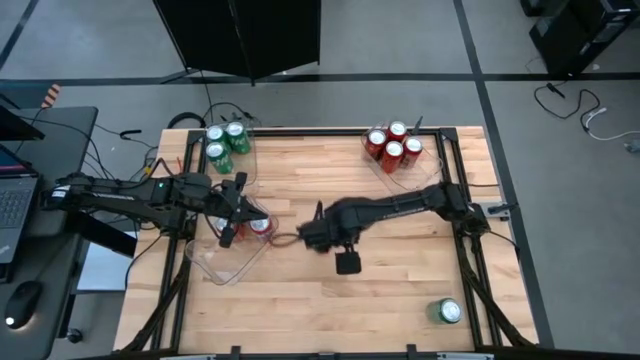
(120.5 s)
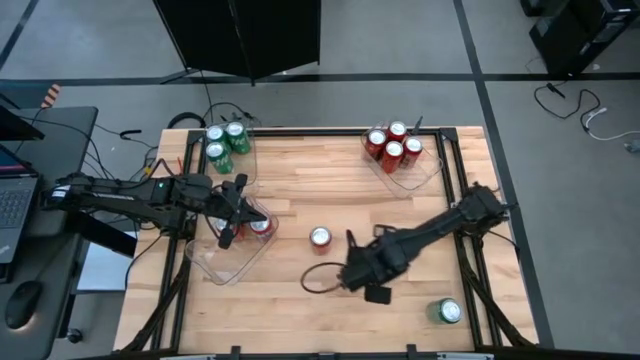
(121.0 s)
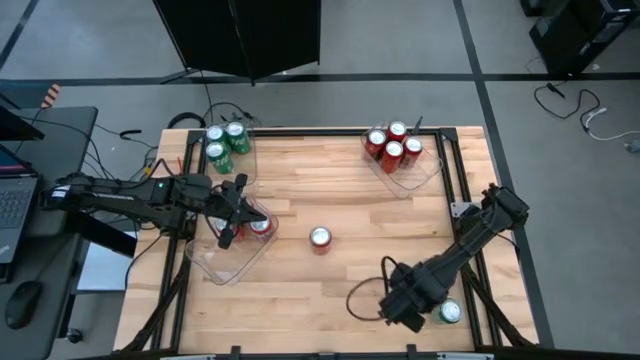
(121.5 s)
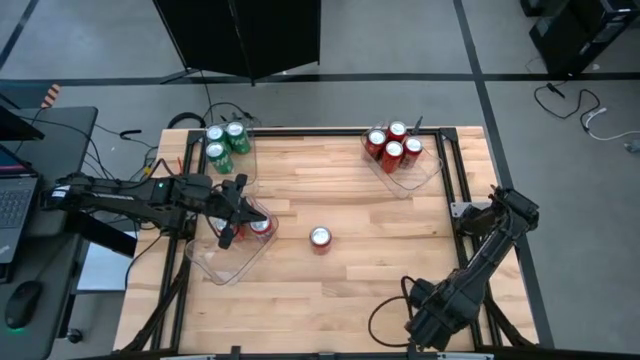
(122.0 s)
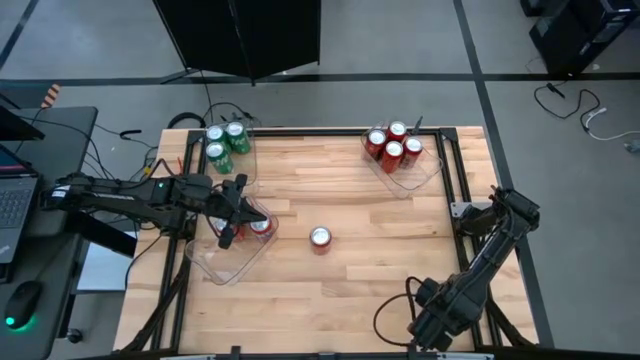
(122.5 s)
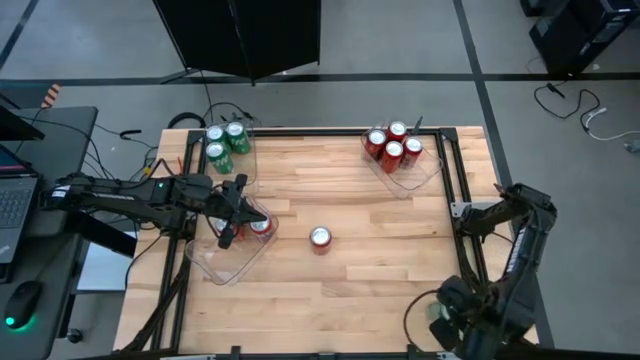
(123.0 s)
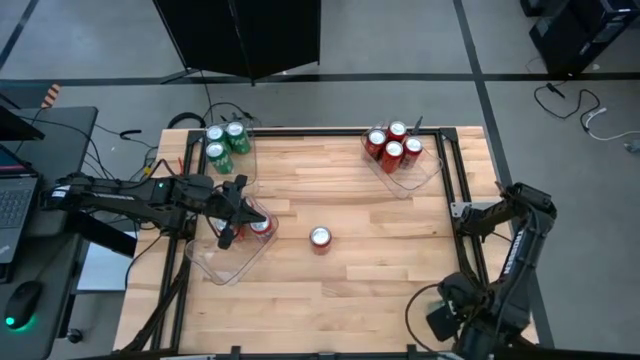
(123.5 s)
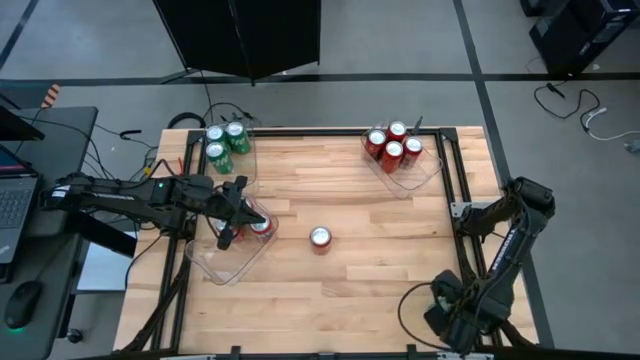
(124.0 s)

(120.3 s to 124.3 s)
Task: Sort soda cans
Put the green soda can into the top left transparent bin

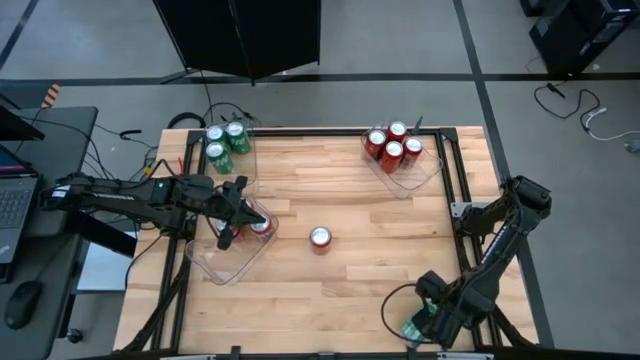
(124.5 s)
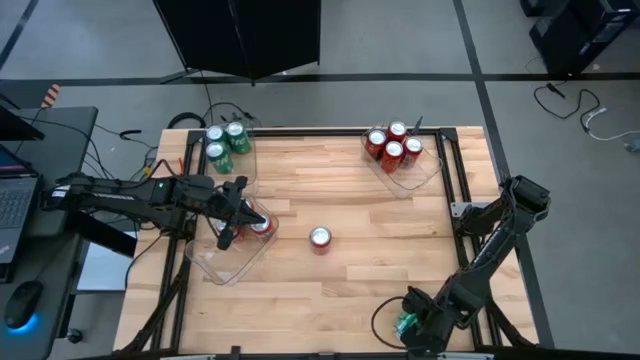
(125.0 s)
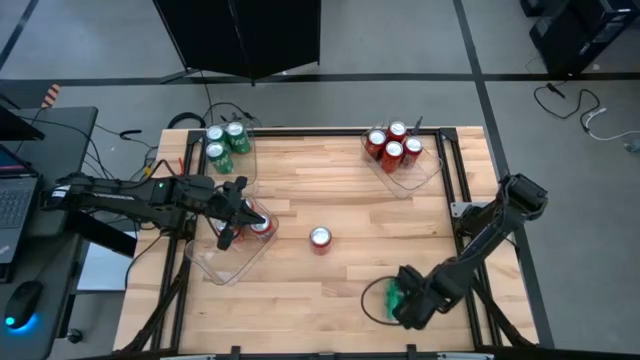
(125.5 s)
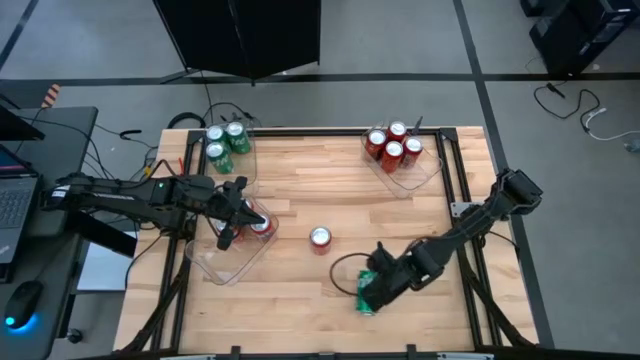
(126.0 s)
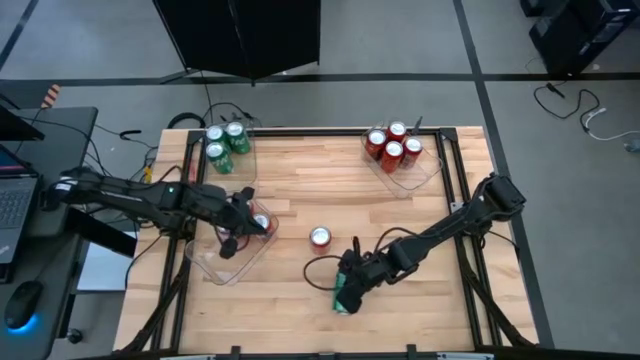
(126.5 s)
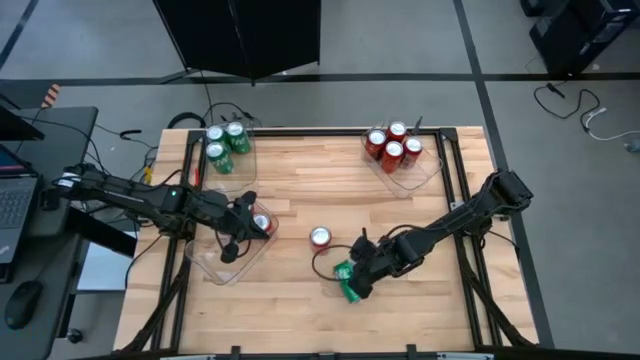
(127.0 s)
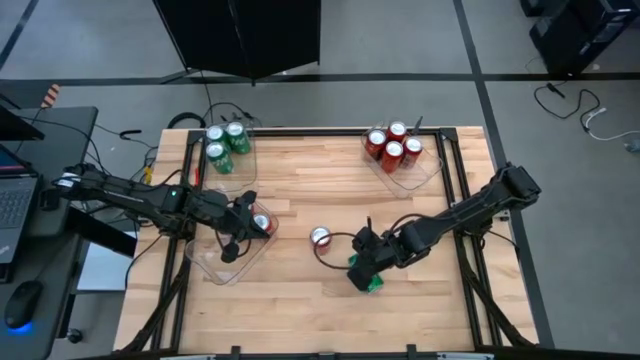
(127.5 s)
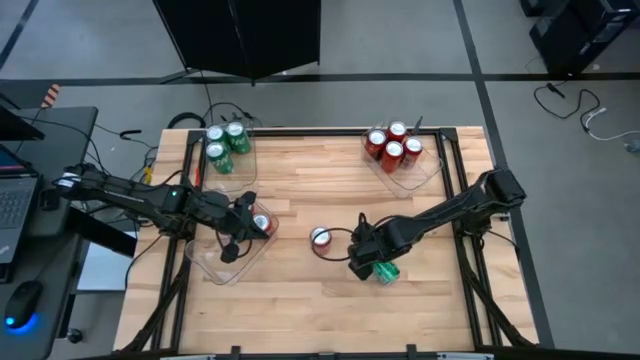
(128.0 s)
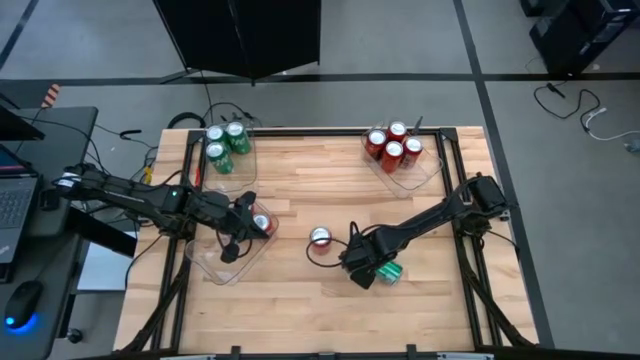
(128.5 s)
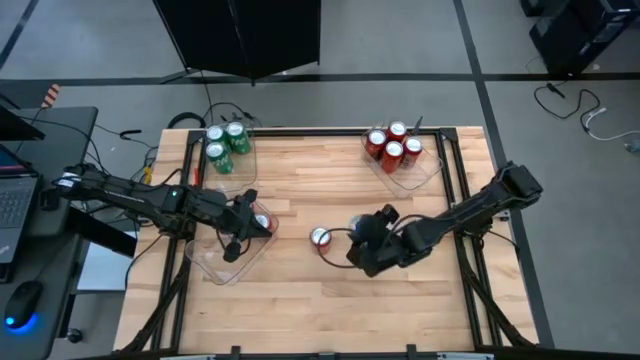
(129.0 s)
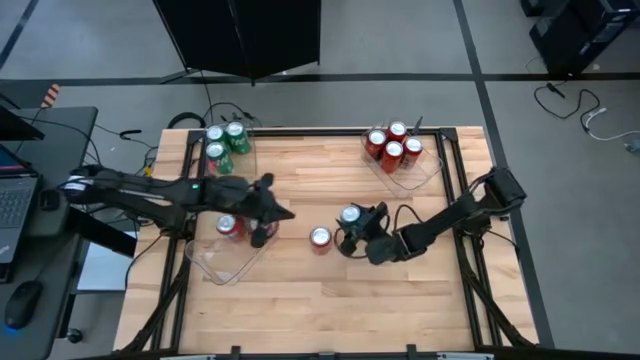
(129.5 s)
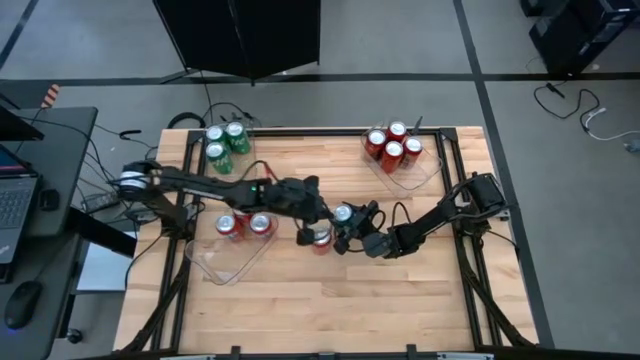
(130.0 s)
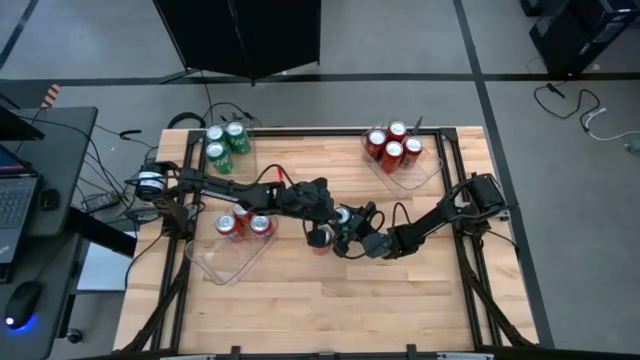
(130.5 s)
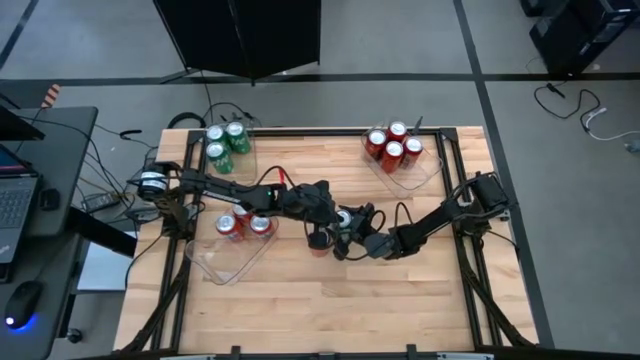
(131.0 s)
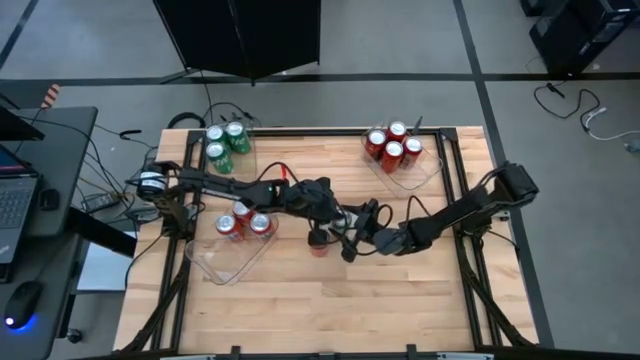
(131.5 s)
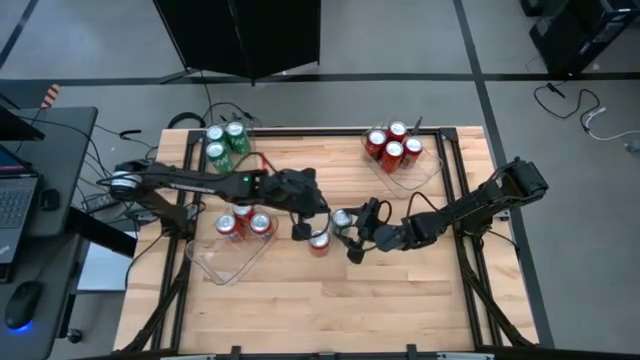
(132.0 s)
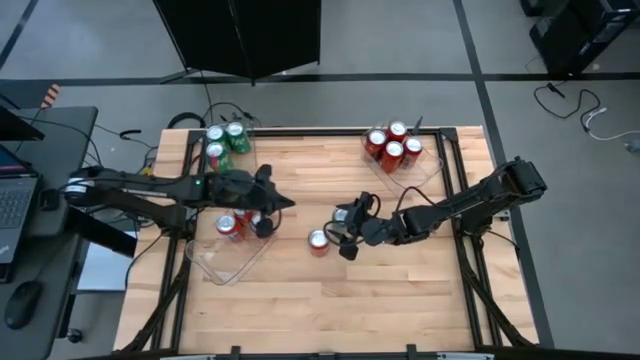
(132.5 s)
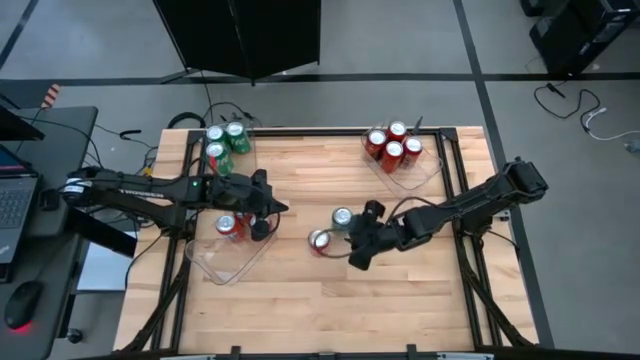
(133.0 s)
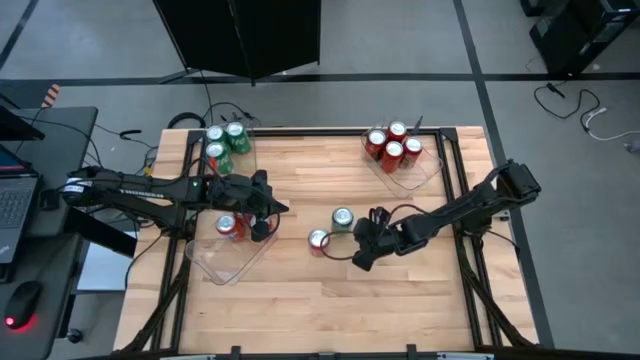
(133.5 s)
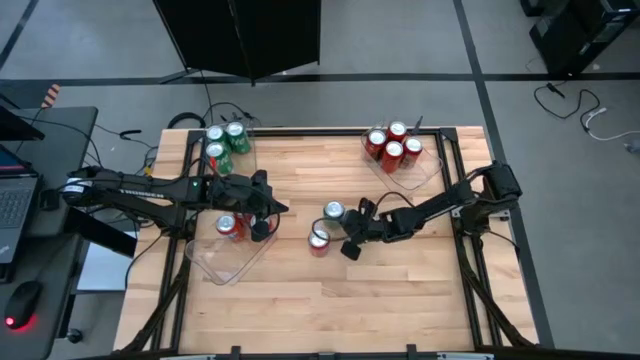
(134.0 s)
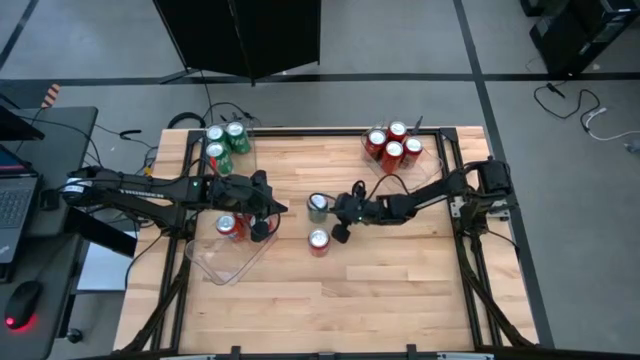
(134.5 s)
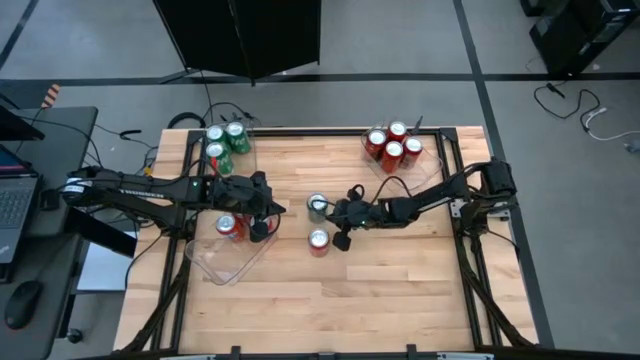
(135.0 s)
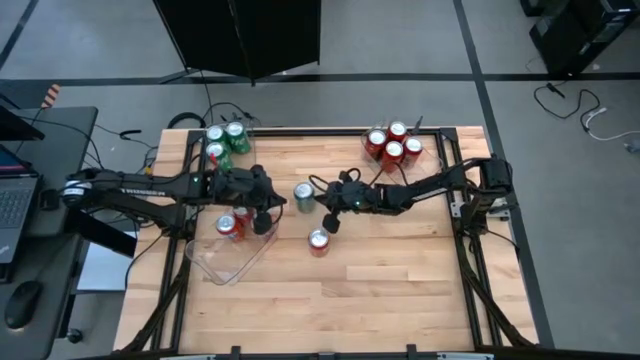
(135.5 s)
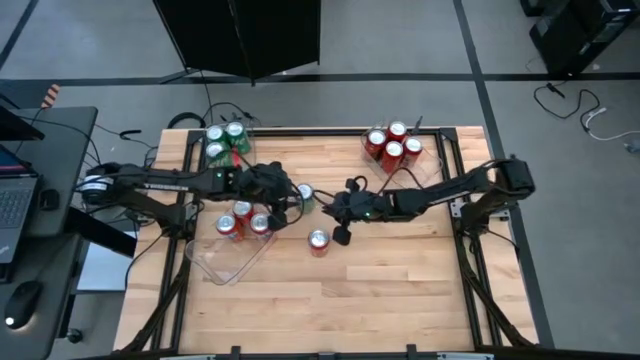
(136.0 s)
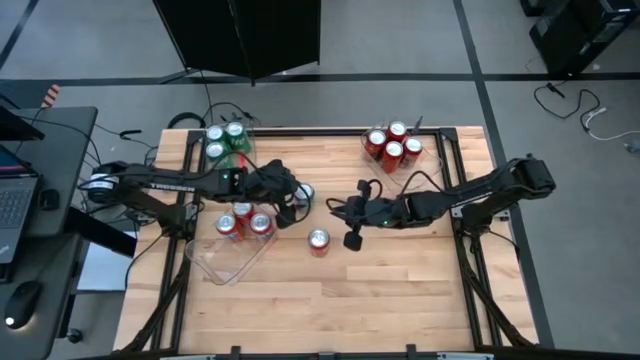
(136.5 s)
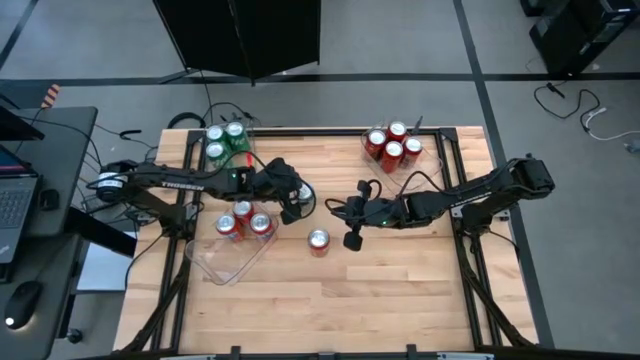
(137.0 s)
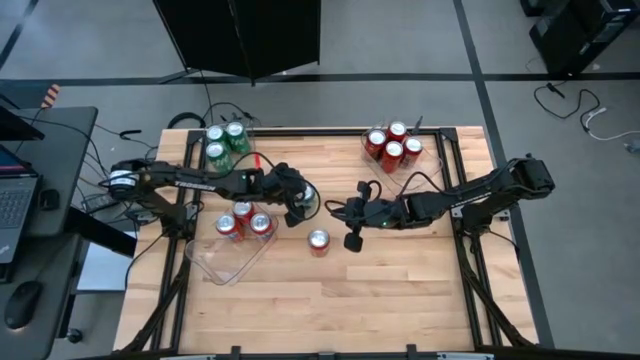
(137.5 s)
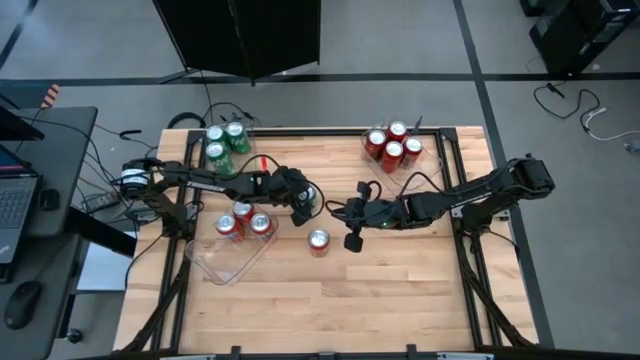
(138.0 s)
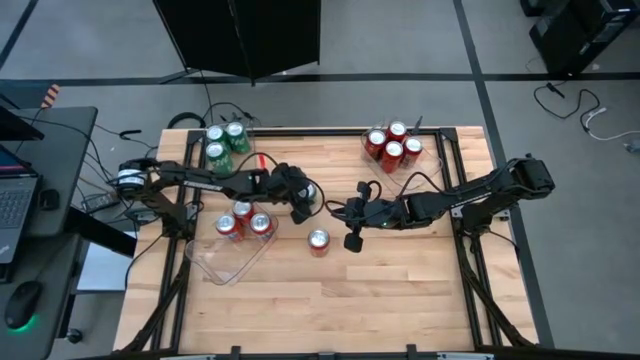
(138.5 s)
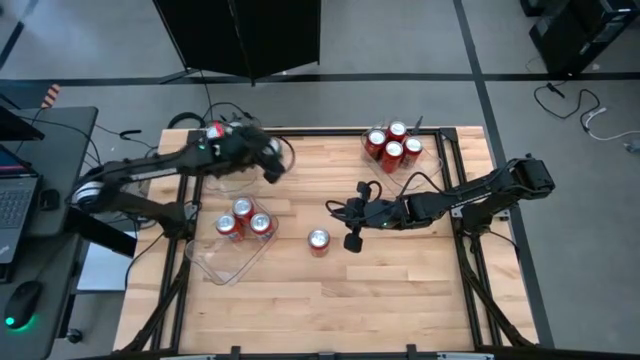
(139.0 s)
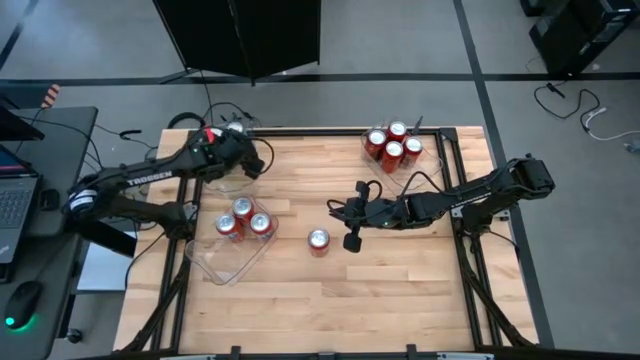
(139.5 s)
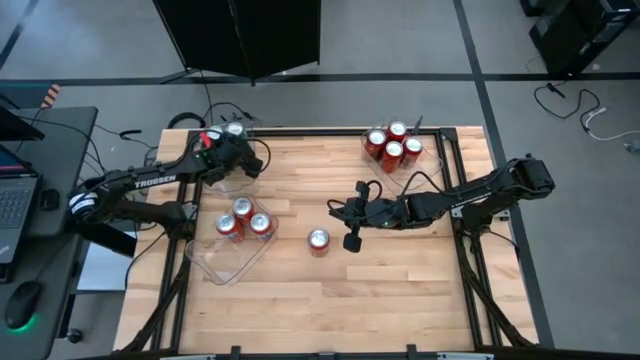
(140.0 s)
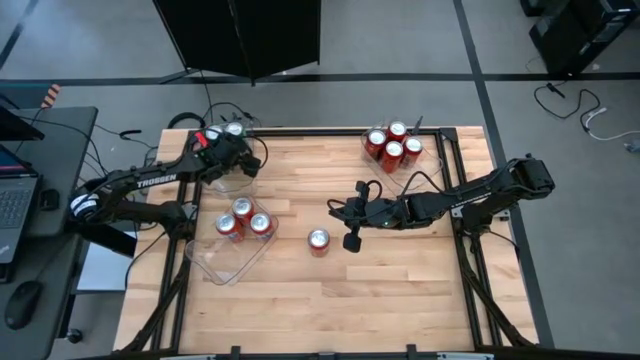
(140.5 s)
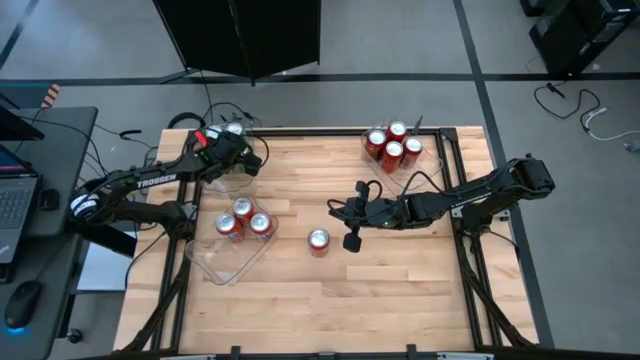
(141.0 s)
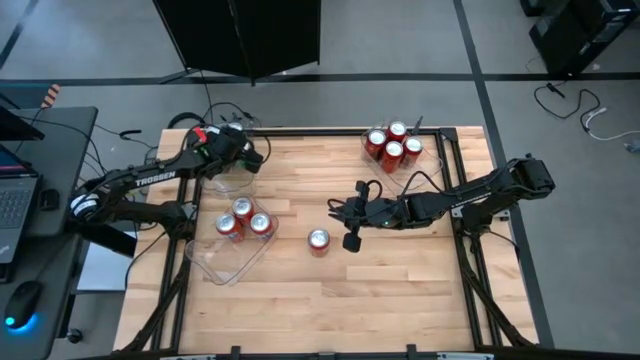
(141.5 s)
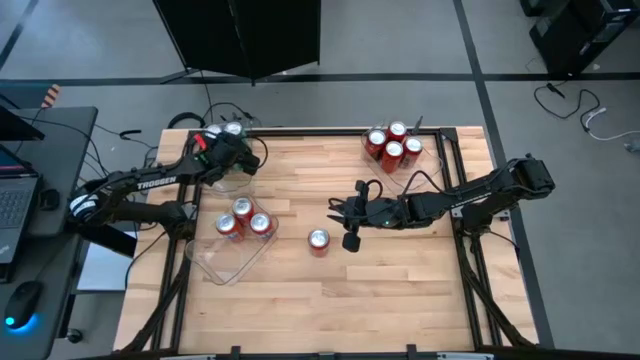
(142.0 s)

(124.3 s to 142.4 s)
Put the green soda can into the top left transparent bin
